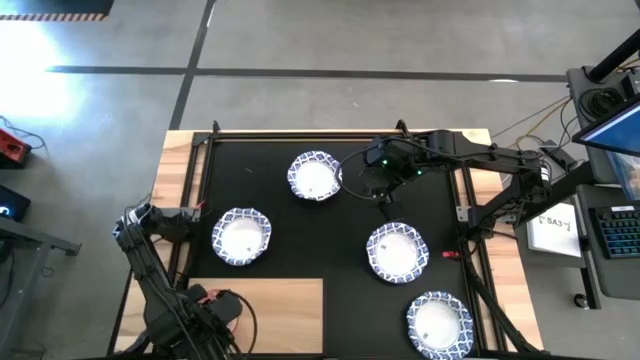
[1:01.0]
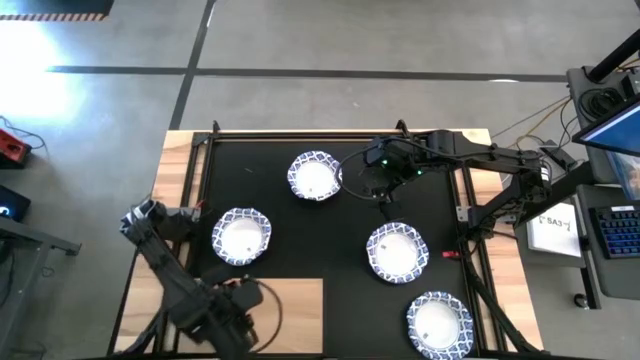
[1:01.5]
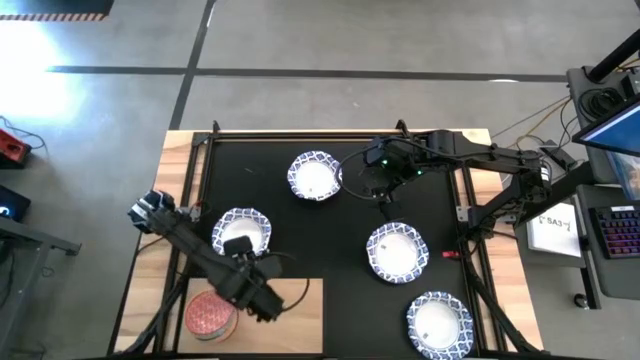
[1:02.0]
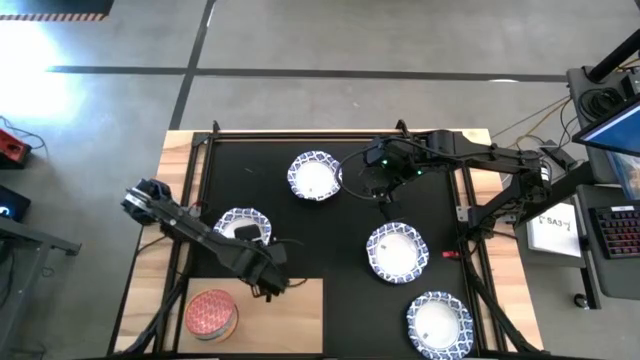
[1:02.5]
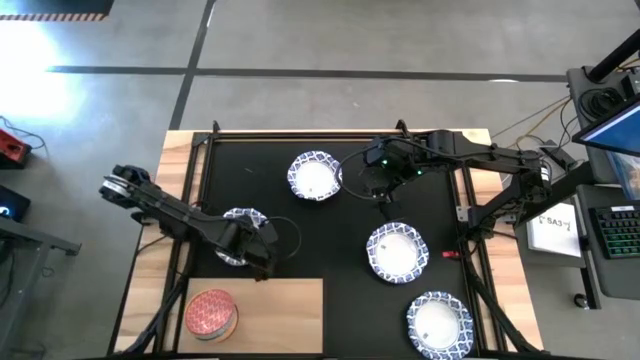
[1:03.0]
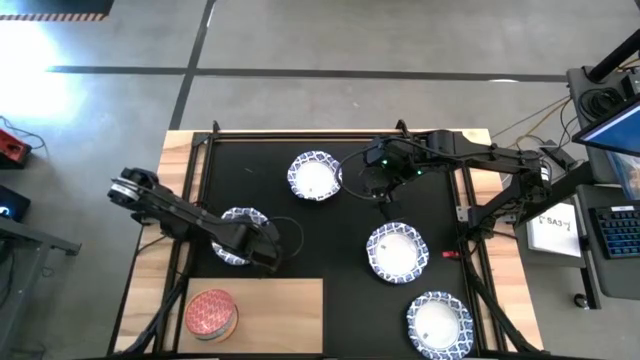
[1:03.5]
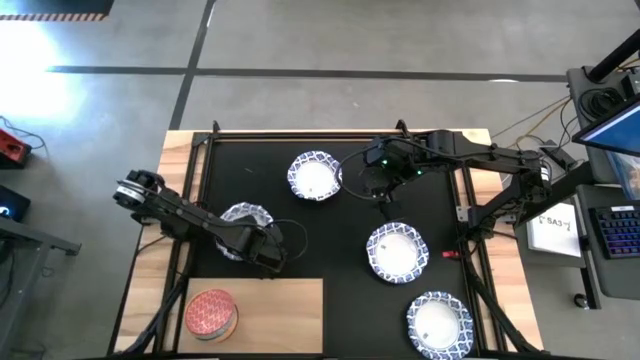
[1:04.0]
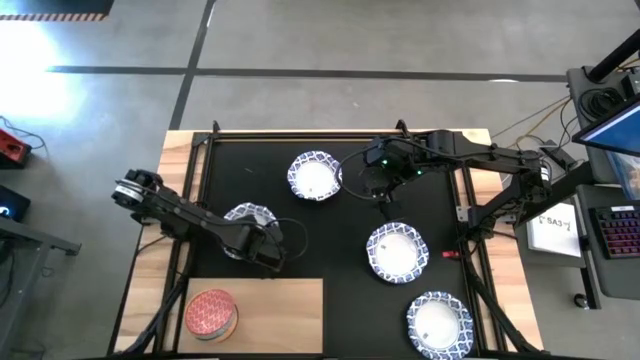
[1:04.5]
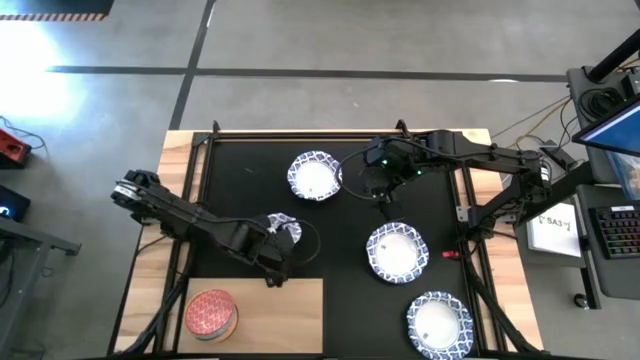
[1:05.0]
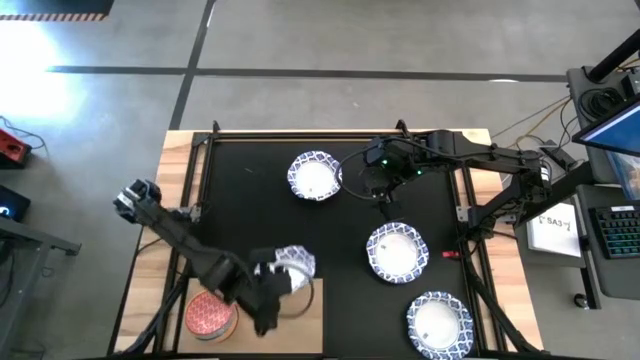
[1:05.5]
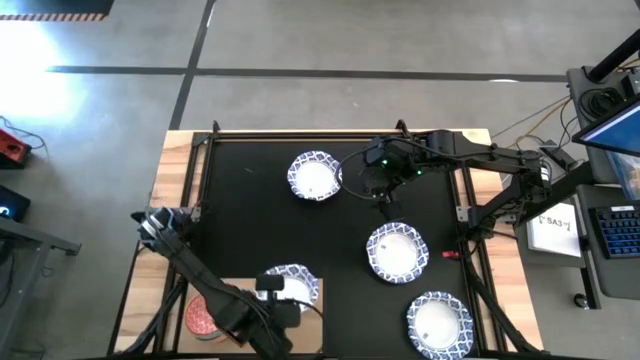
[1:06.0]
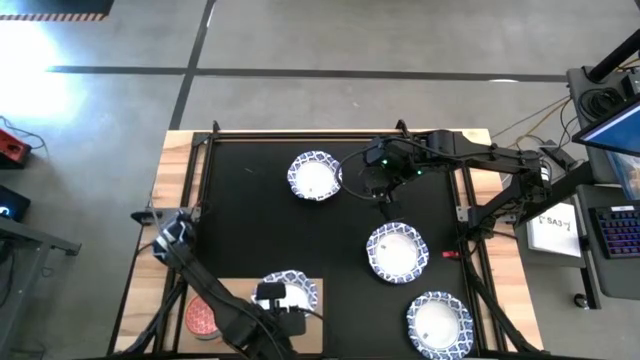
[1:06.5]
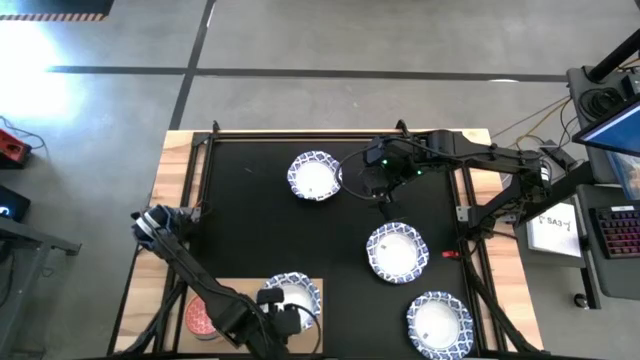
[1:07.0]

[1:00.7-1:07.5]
Task: Place and stack bowls onto a shelf
Put the white patterned bowl on the shelf

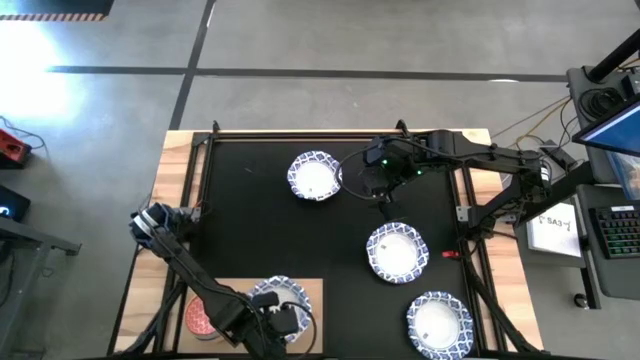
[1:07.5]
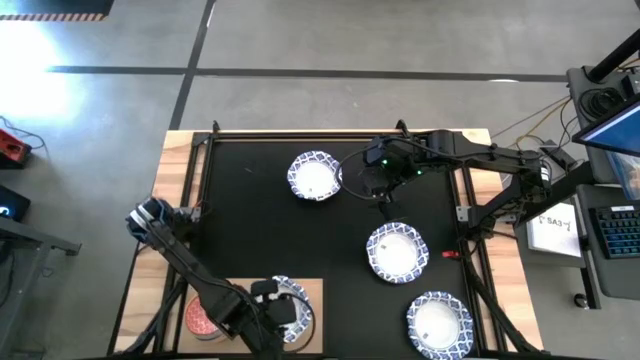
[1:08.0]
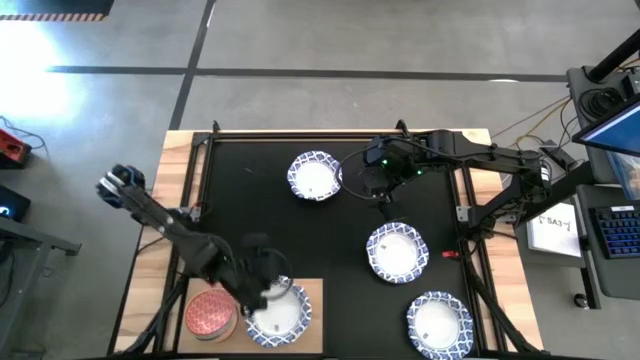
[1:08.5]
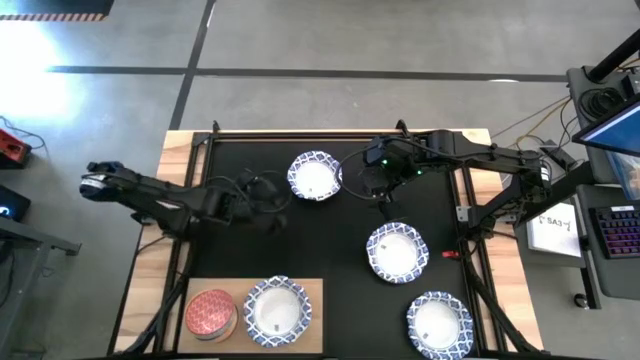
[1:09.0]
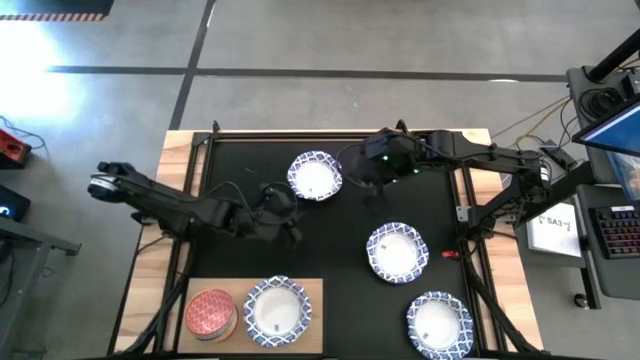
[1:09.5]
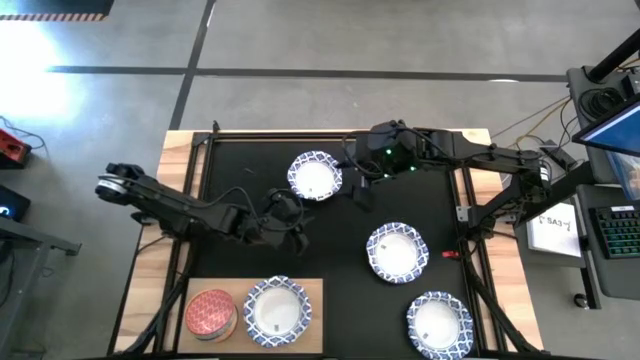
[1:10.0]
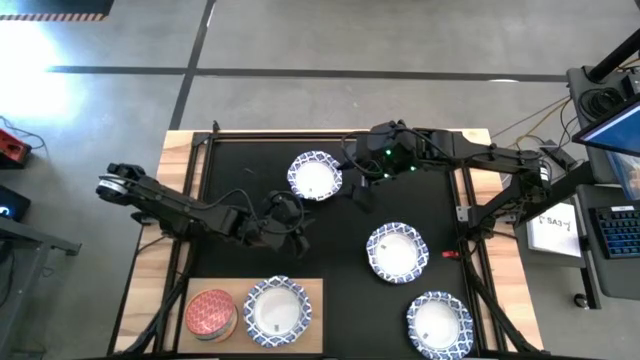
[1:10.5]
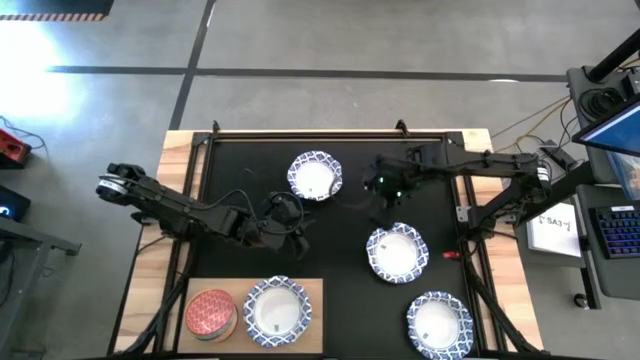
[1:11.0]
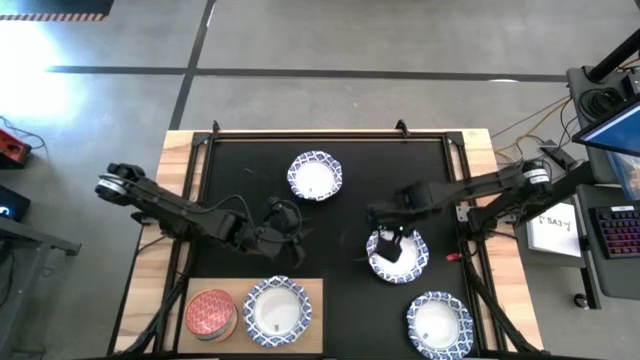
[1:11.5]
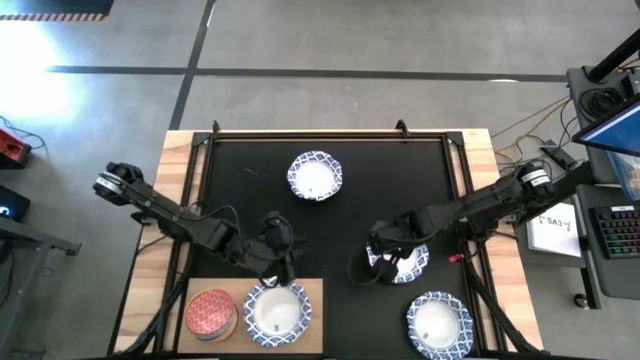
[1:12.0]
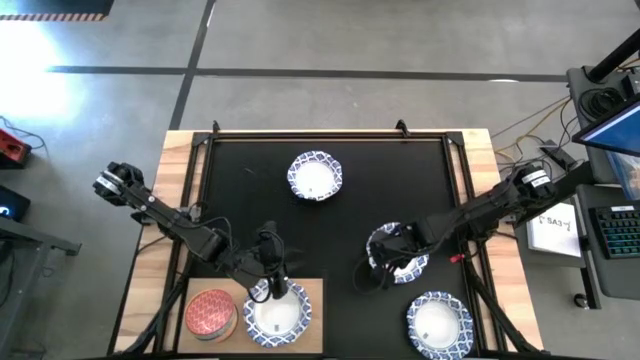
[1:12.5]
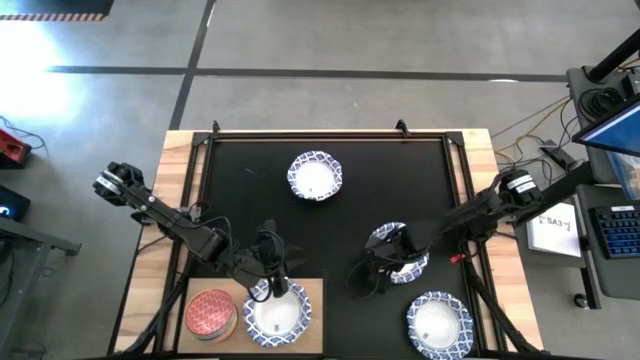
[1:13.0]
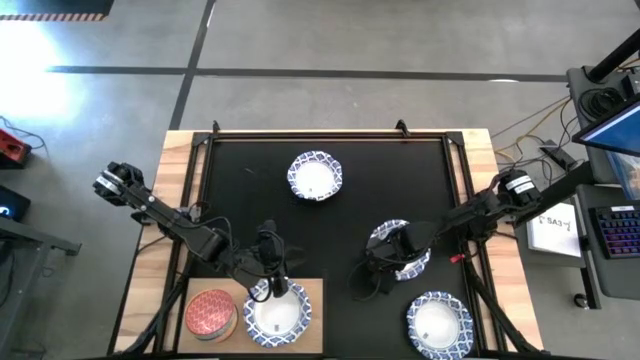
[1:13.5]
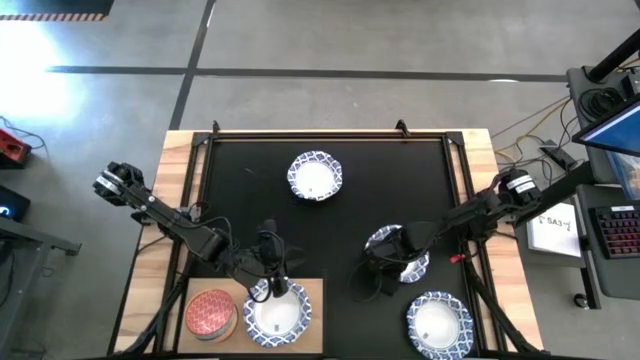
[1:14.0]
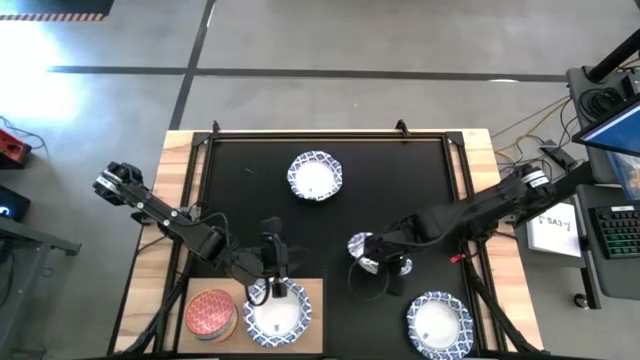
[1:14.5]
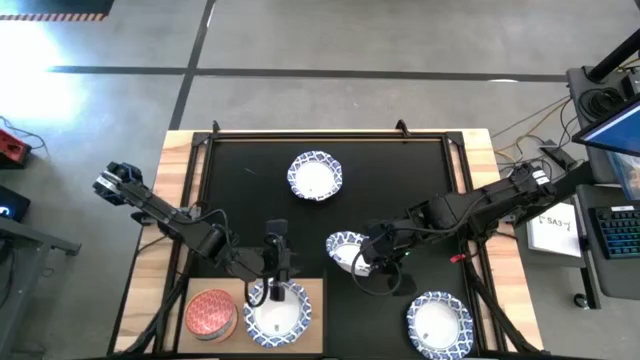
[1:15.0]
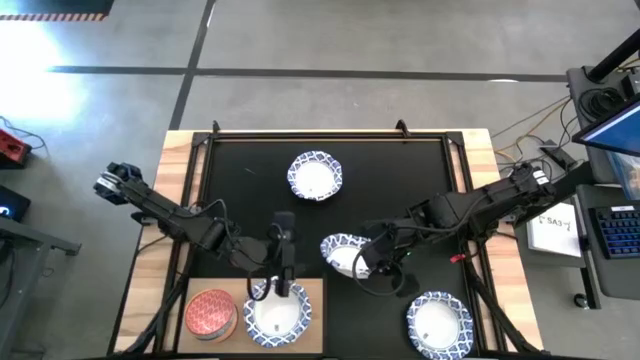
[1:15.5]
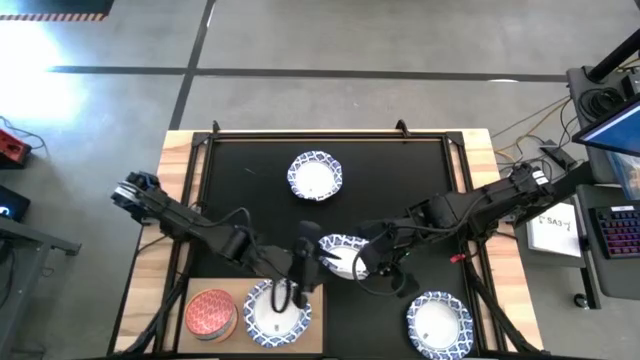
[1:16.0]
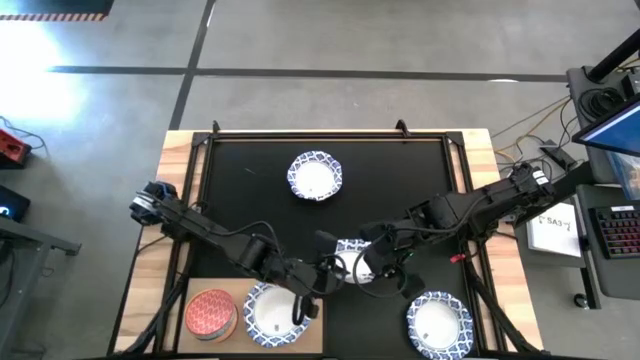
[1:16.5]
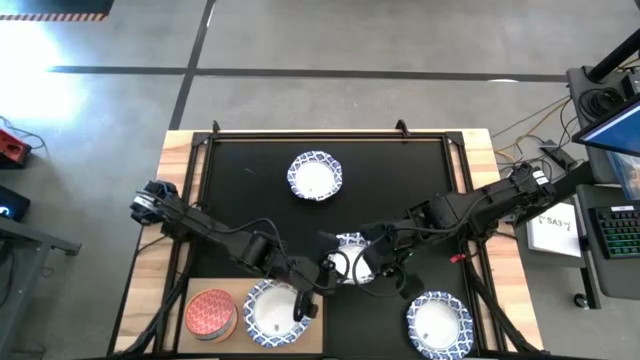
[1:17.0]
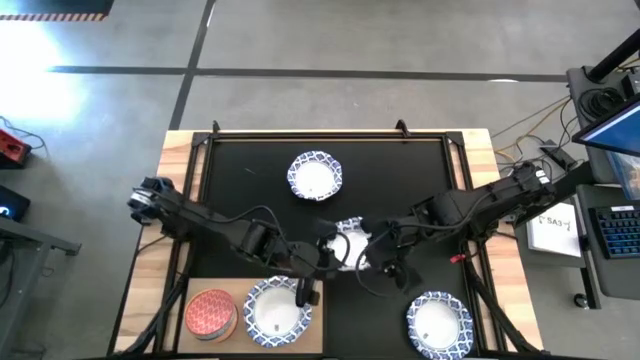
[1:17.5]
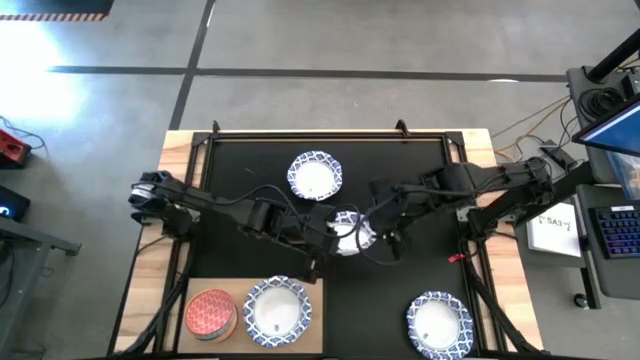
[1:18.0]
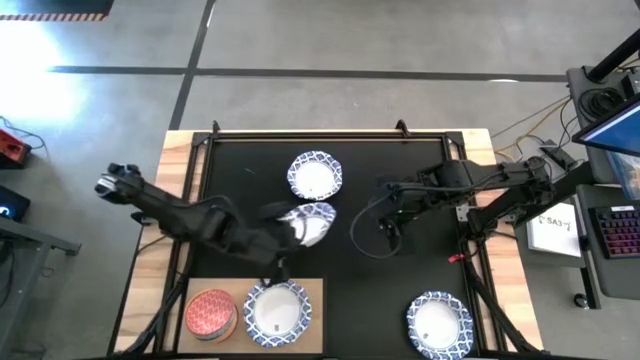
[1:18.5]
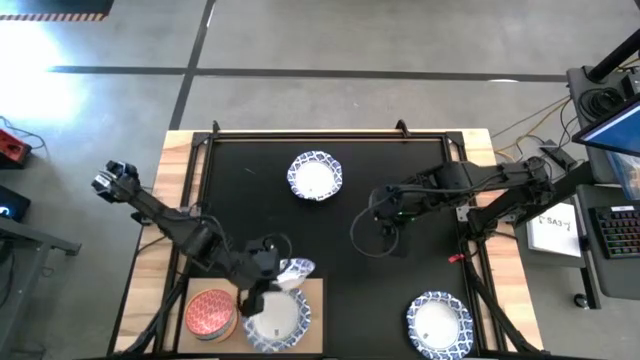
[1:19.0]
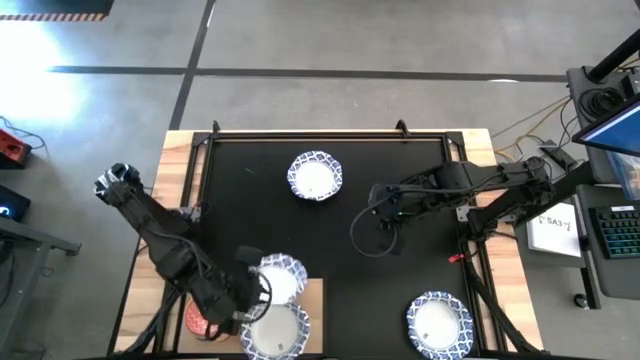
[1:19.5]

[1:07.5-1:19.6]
Stack the white patterned bowl on top of the white patterned bowl on the shelf
